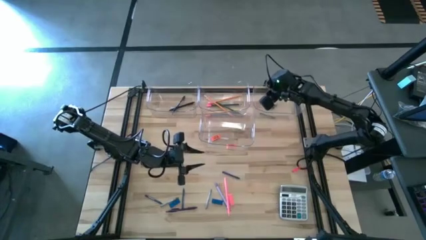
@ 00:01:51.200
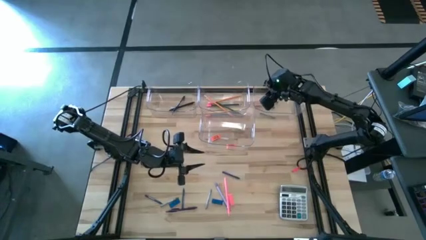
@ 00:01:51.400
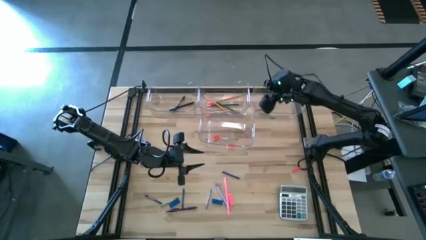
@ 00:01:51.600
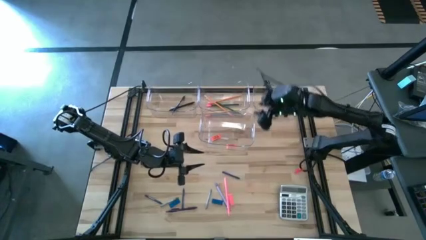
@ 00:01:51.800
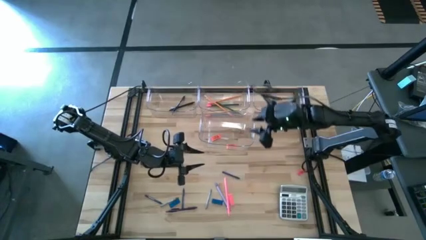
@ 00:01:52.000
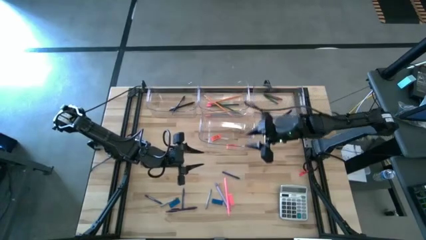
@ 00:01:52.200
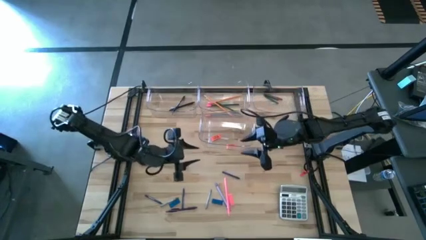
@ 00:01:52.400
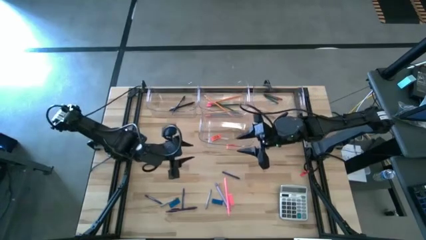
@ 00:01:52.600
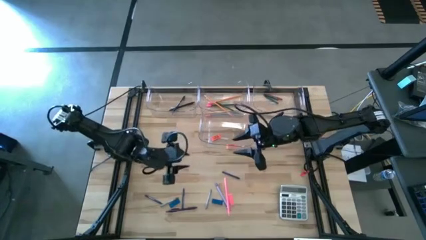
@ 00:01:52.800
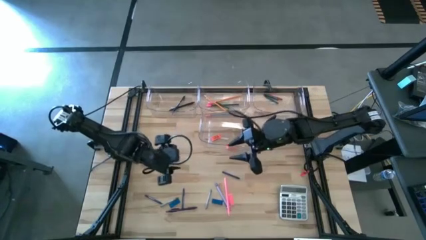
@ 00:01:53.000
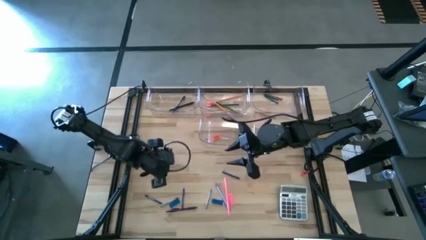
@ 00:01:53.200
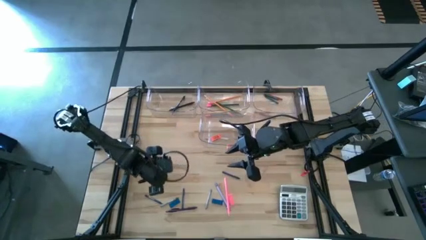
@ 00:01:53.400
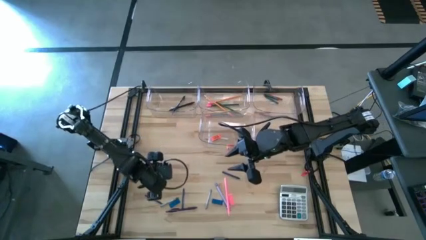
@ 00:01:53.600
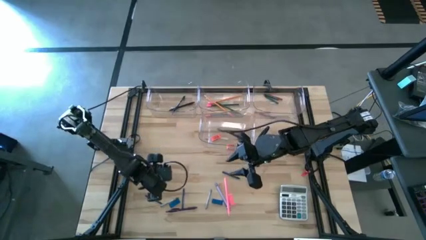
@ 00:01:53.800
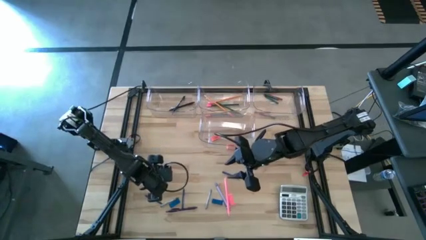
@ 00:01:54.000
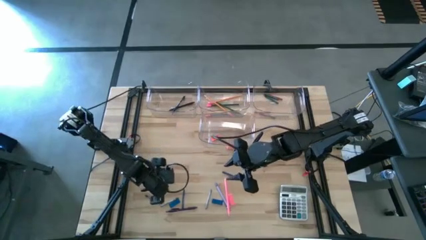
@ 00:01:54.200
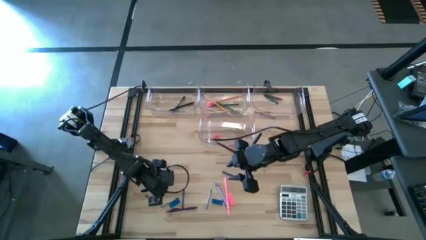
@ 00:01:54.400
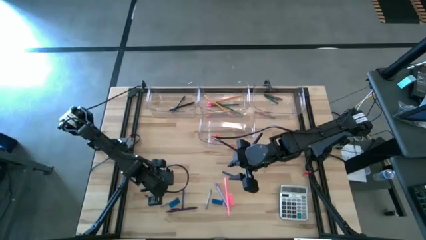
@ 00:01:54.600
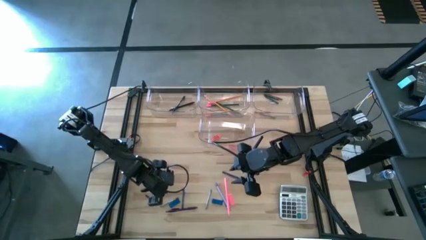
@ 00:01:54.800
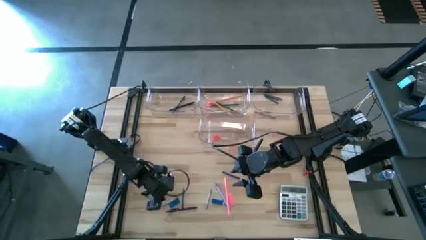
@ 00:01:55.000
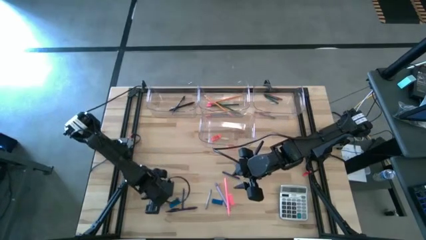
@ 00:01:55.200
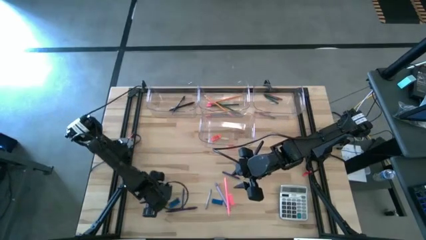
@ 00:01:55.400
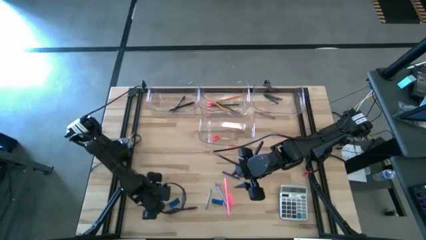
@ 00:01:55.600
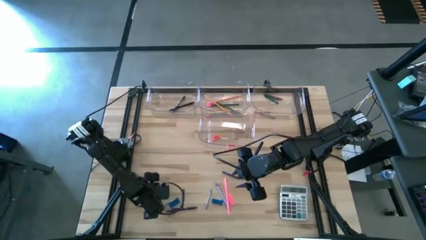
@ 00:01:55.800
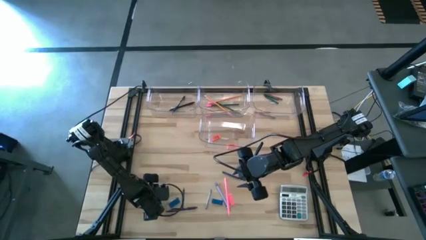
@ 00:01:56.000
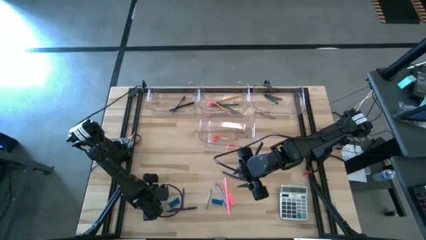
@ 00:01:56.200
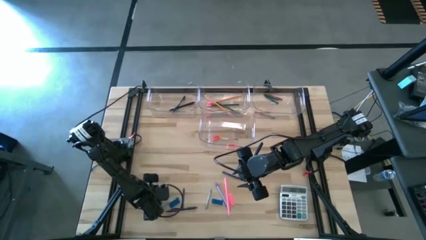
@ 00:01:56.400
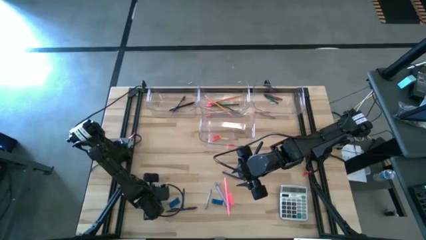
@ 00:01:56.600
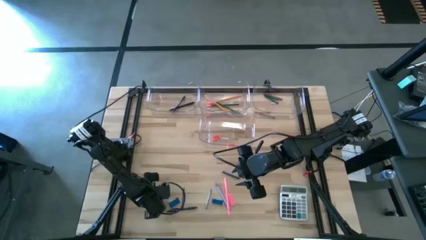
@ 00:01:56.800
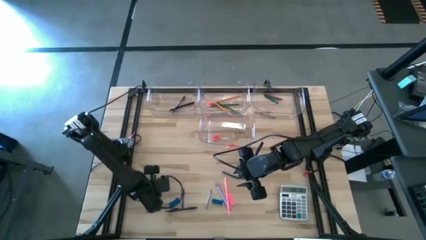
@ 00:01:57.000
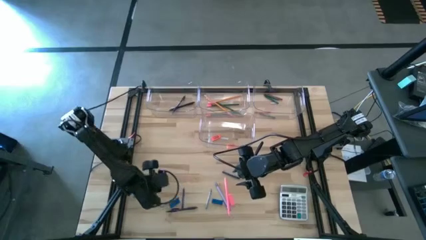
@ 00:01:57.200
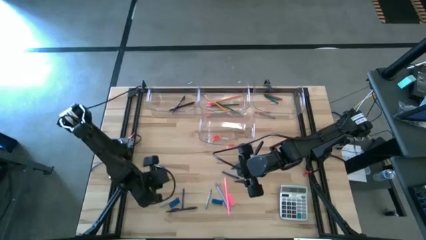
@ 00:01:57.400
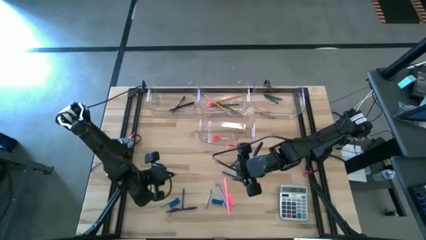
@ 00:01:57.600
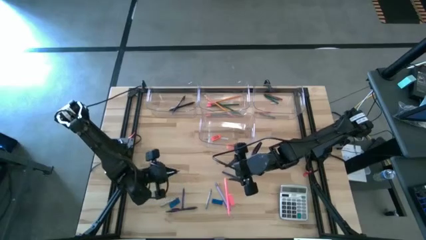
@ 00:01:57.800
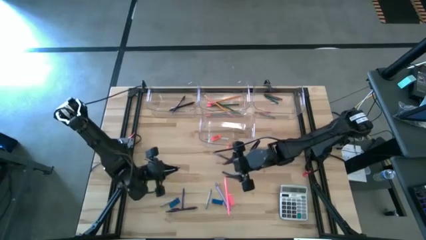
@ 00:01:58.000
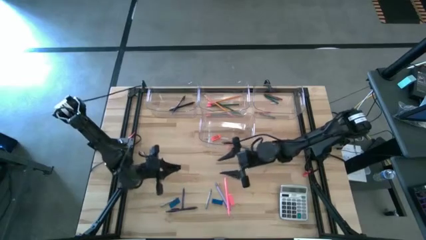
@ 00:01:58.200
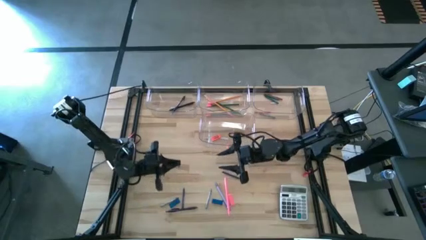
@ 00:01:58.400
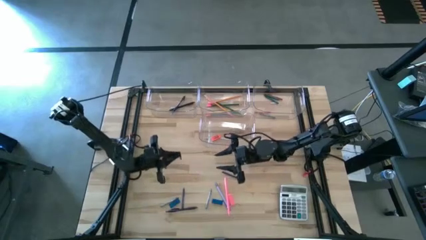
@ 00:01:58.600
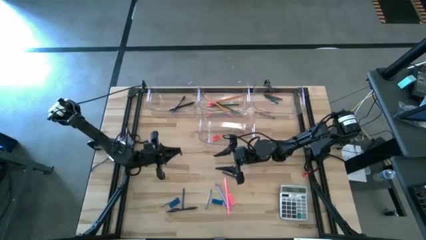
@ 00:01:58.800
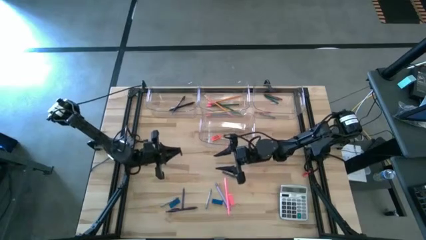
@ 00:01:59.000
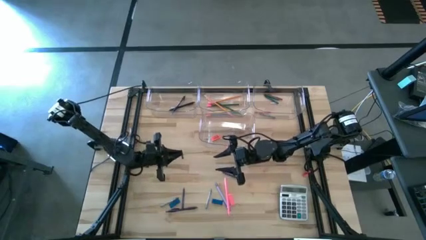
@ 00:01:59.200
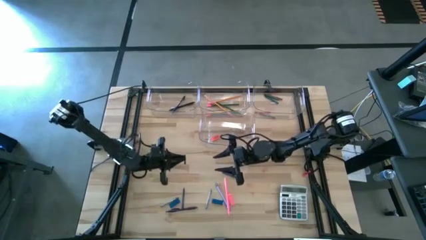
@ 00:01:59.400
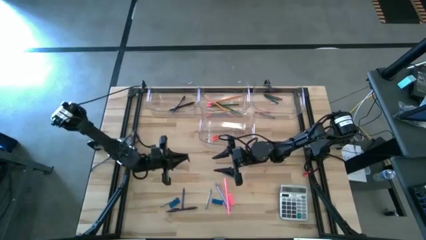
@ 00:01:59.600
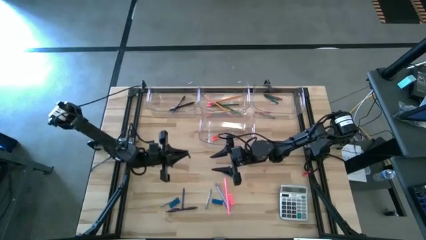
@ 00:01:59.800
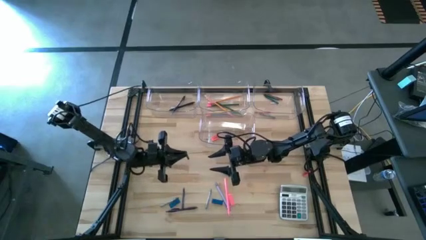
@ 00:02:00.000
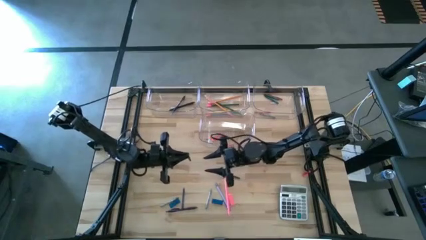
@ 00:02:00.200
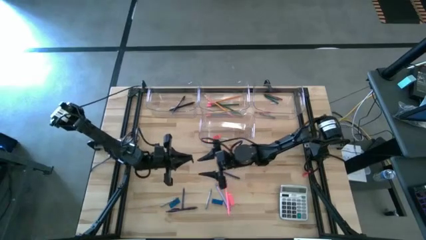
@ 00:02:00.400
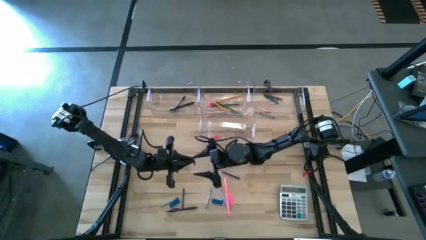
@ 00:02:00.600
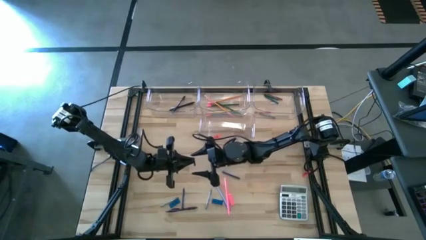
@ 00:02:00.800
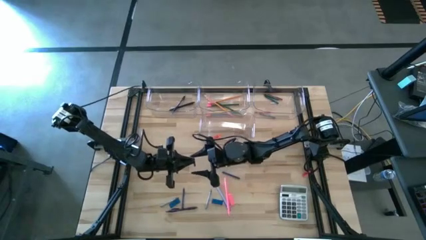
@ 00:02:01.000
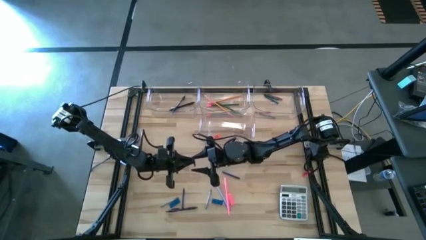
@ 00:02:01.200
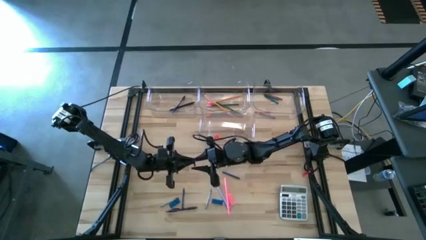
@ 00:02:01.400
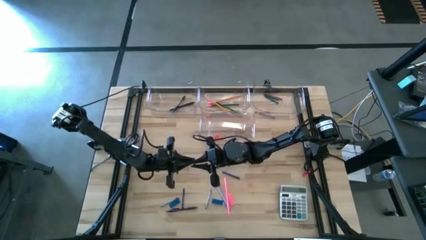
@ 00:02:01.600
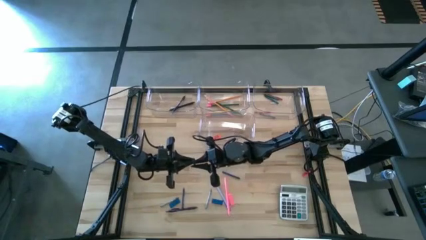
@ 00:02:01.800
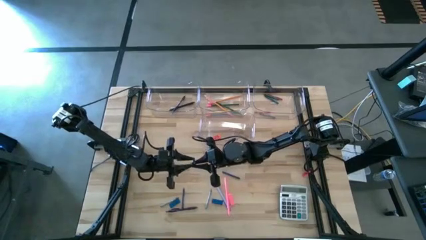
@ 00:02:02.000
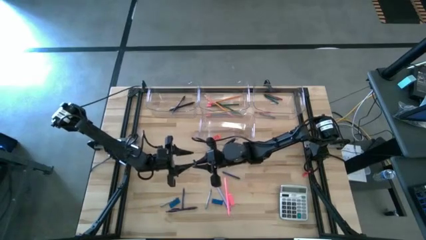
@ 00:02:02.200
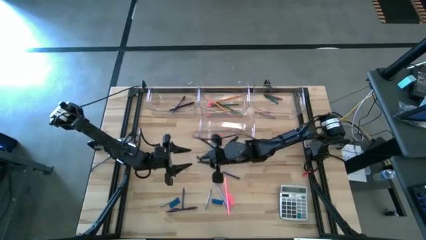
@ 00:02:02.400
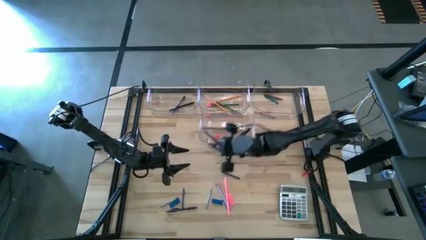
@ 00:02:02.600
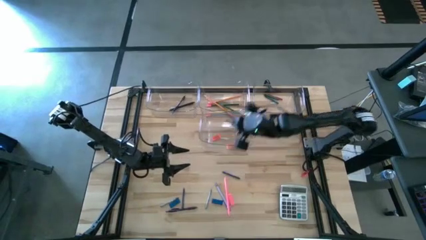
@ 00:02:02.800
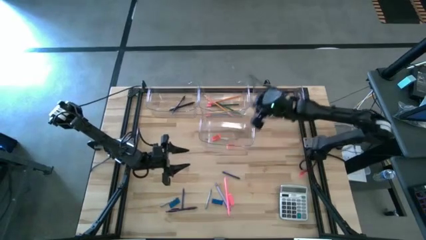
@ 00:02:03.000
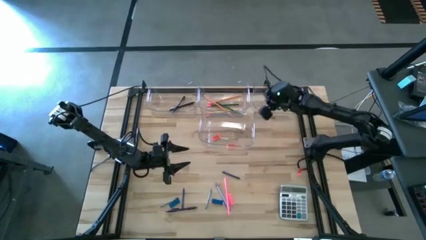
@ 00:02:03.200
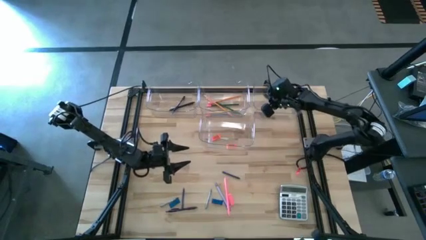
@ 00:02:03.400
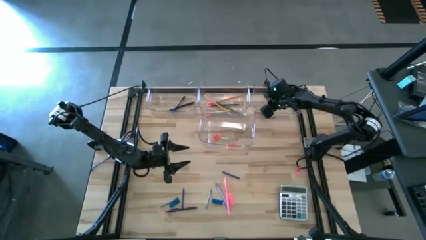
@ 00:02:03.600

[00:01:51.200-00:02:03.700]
Task: Sort crayons/erasers/pens/pencils in bins
Put the blue crayon into the top right transparent bin

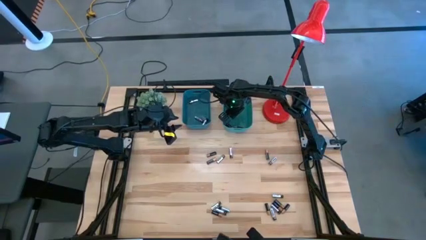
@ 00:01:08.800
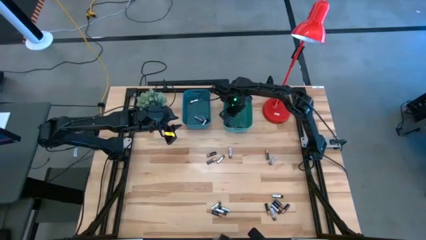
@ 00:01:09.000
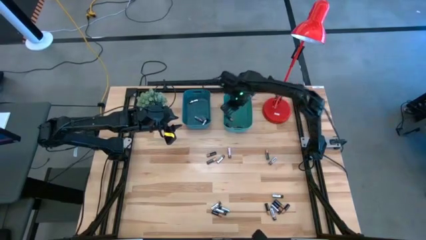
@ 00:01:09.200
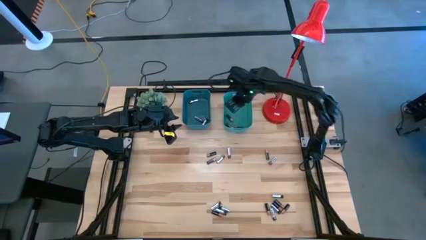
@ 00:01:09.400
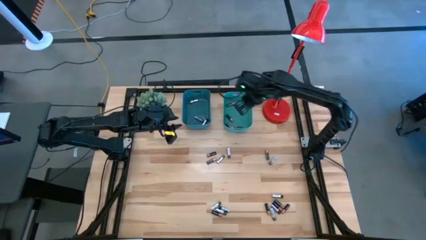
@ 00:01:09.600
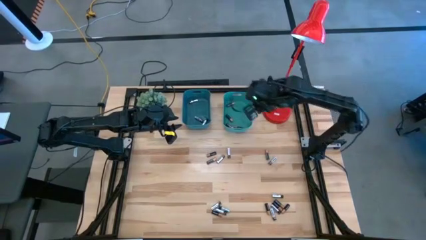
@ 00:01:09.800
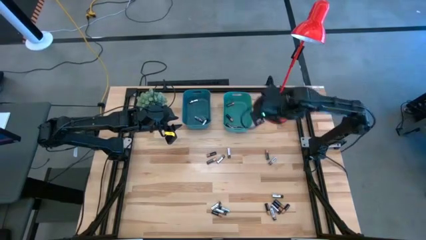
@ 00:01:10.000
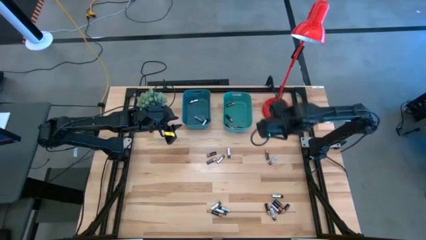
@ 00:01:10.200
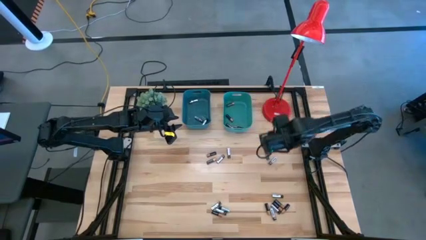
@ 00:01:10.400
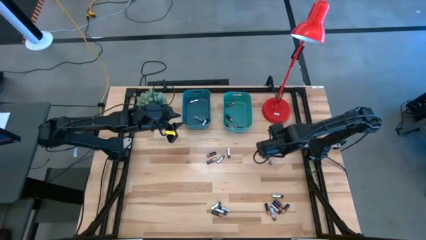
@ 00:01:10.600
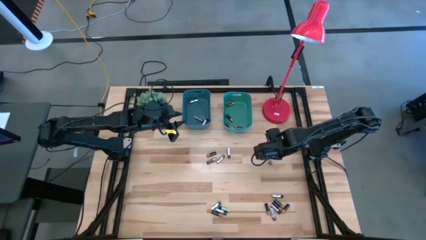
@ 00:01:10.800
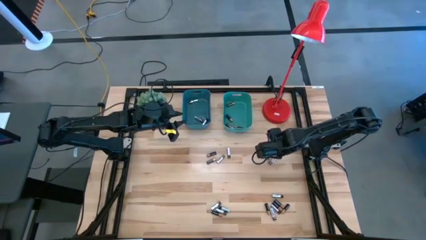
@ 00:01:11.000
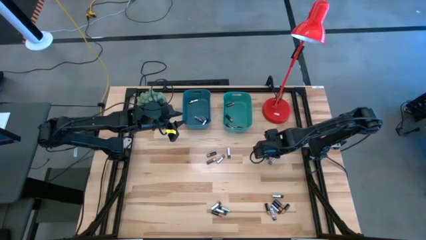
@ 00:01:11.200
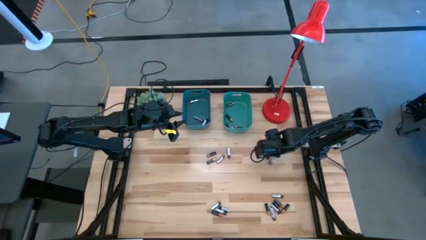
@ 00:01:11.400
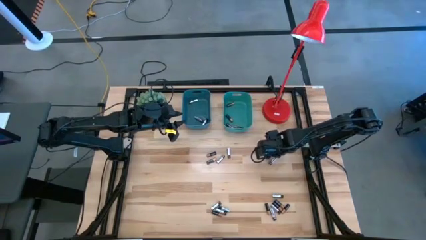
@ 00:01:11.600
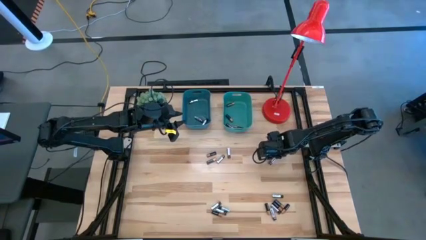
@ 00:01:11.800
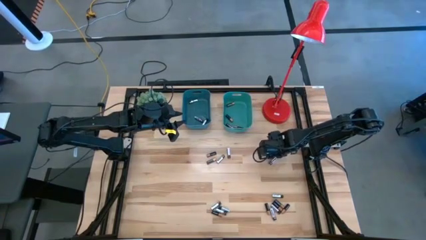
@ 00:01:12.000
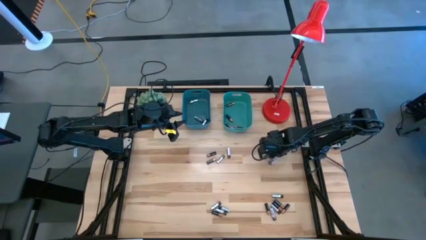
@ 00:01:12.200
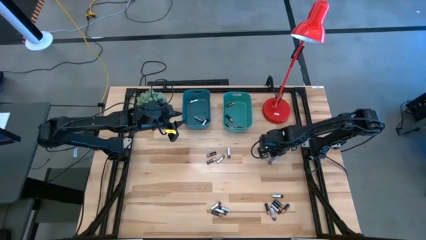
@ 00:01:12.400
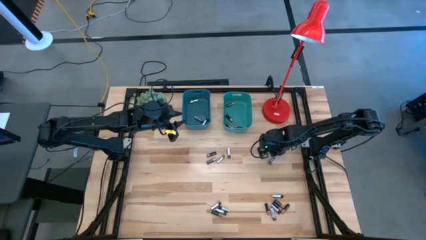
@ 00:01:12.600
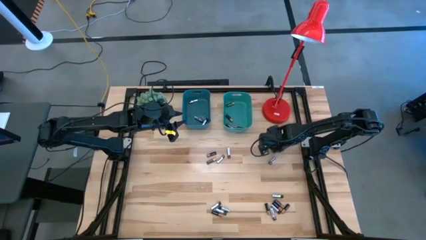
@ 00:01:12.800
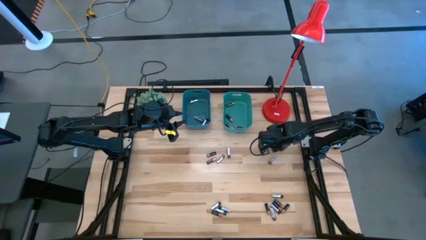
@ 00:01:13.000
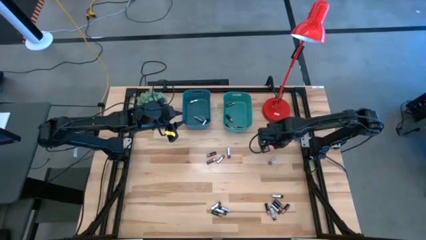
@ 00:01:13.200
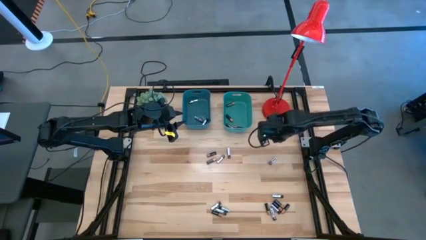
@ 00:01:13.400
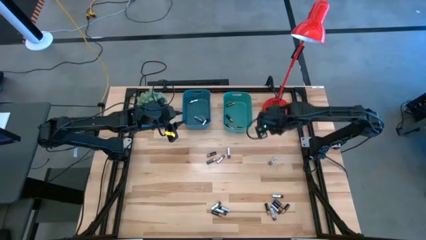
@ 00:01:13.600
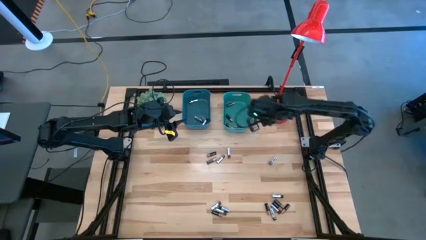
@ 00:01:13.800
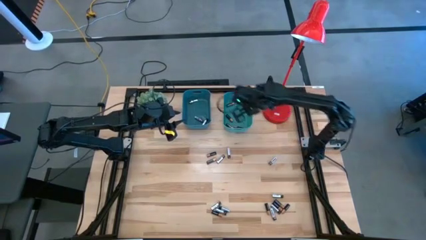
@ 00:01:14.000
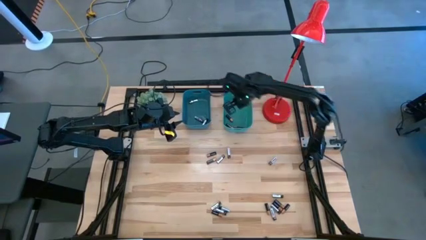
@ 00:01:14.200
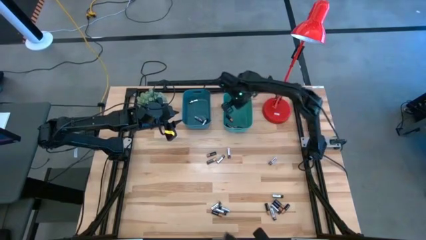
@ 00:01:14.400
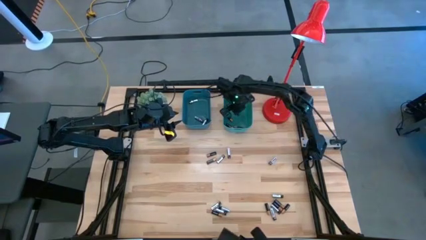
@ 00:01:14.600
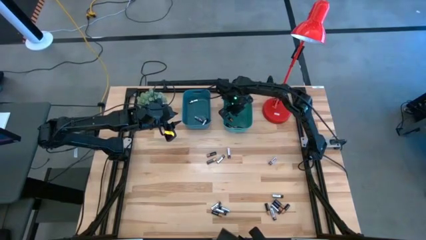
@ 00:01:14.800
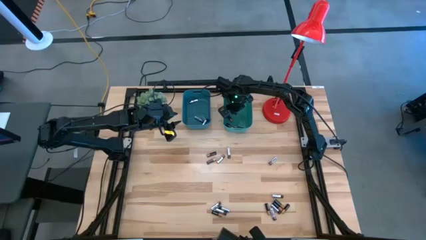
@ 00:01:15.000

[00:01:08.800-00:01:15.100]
Task: Sort batteries
Put the black battery into the green bin
